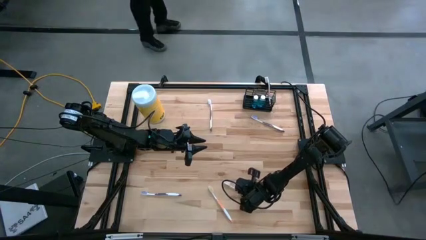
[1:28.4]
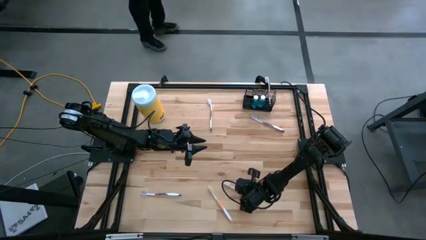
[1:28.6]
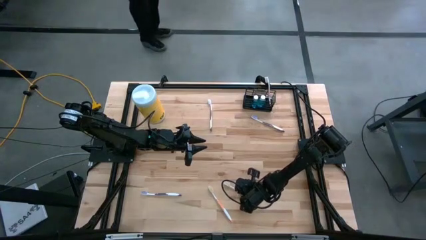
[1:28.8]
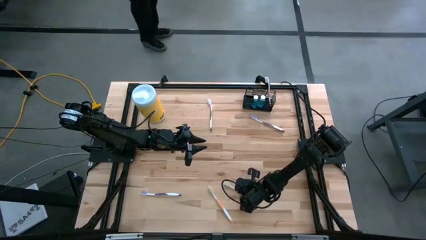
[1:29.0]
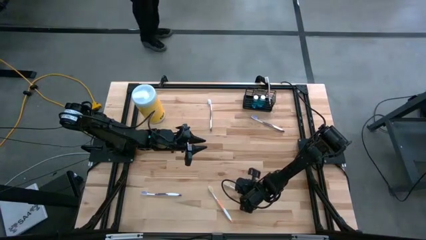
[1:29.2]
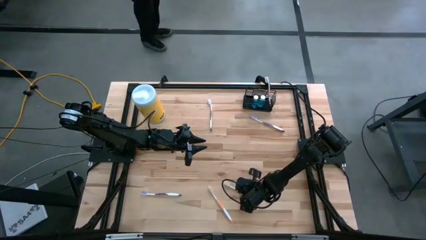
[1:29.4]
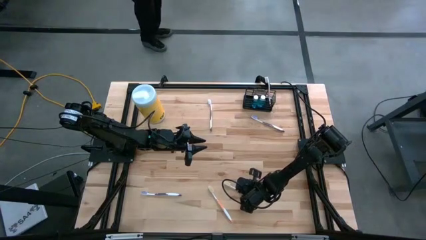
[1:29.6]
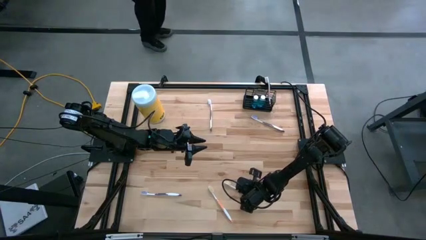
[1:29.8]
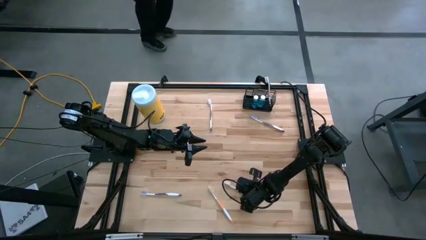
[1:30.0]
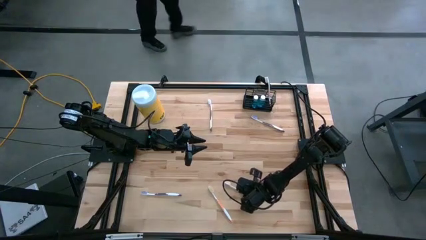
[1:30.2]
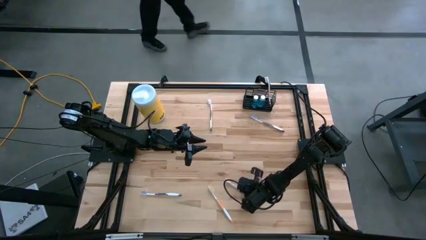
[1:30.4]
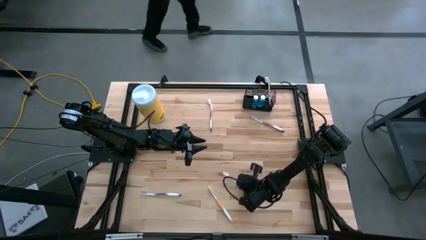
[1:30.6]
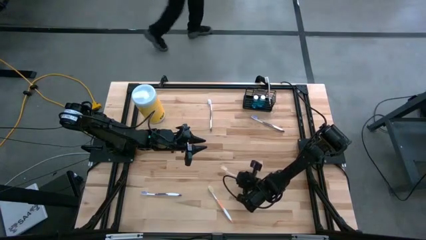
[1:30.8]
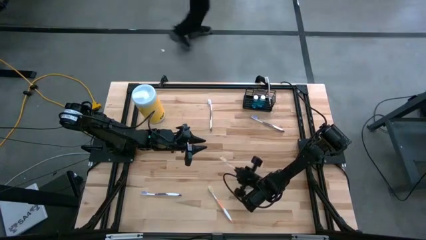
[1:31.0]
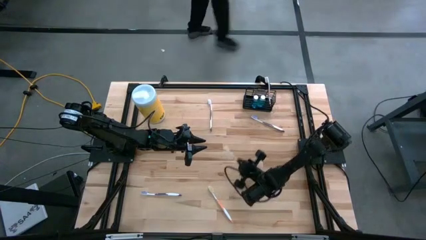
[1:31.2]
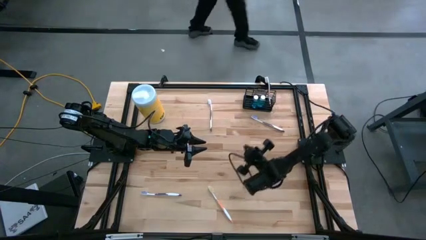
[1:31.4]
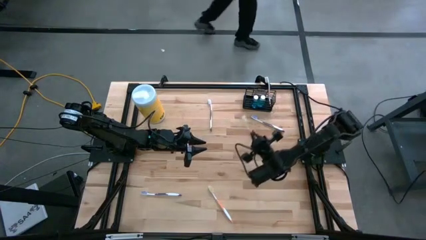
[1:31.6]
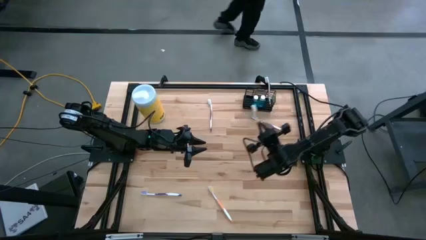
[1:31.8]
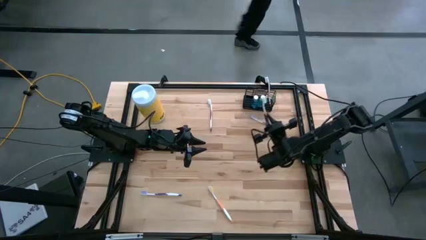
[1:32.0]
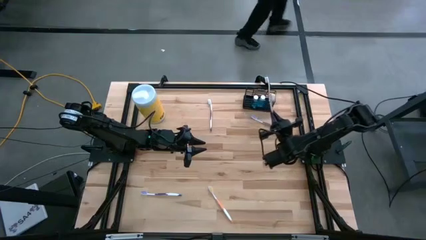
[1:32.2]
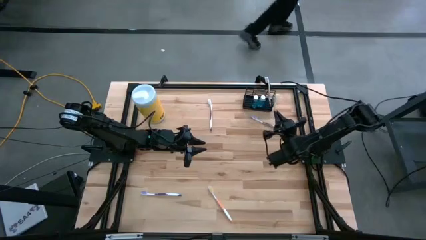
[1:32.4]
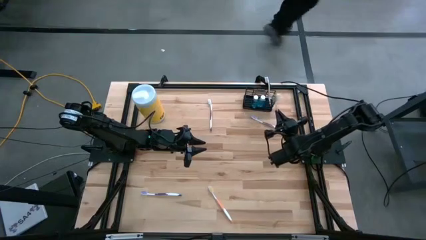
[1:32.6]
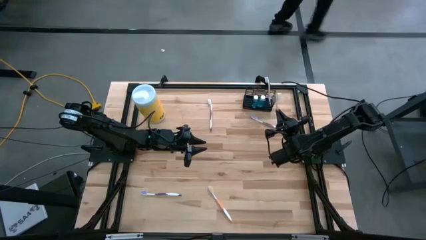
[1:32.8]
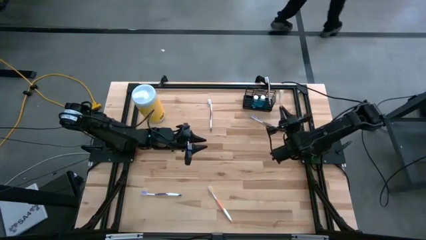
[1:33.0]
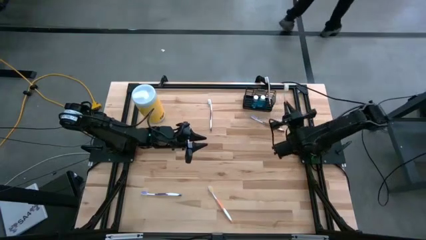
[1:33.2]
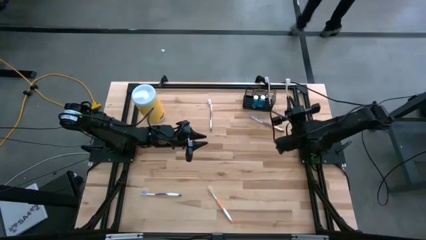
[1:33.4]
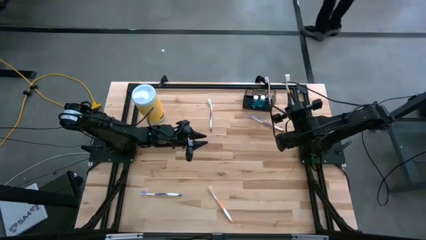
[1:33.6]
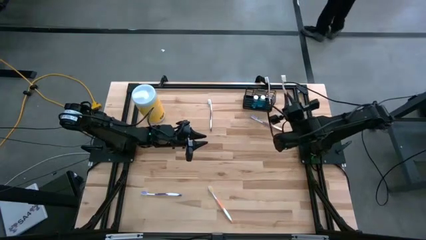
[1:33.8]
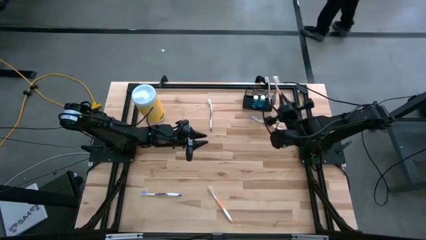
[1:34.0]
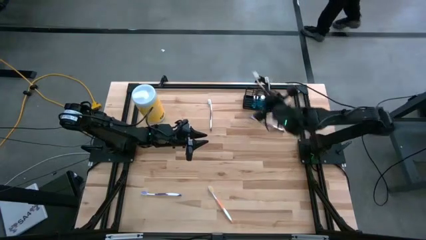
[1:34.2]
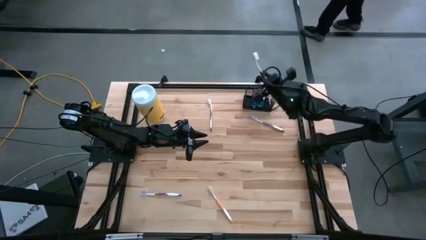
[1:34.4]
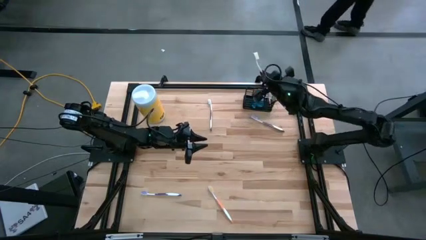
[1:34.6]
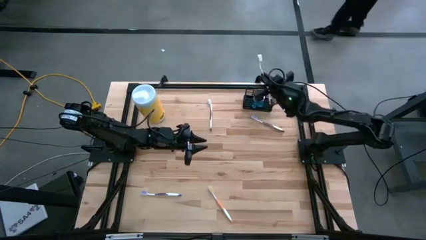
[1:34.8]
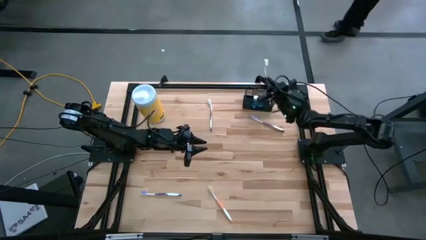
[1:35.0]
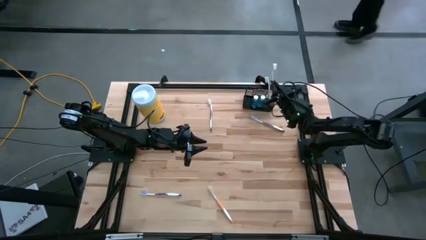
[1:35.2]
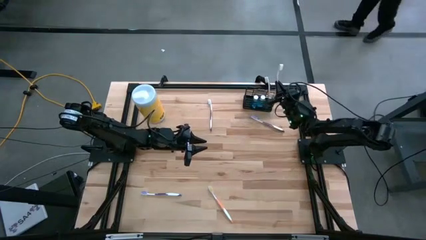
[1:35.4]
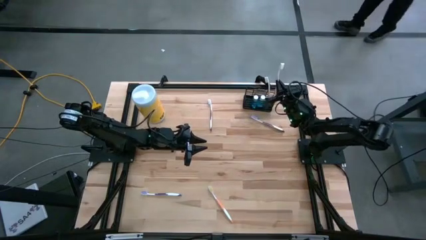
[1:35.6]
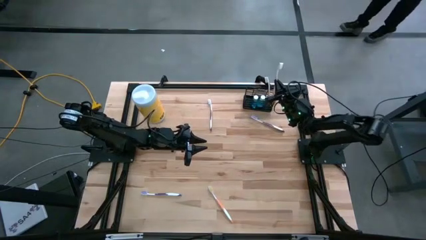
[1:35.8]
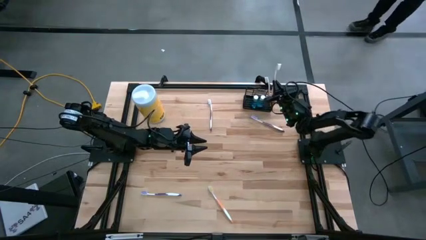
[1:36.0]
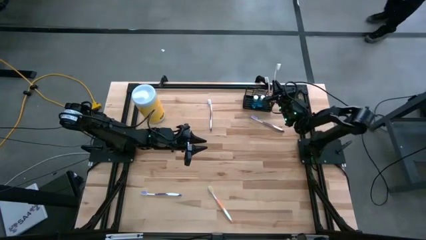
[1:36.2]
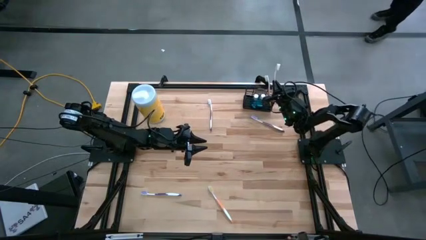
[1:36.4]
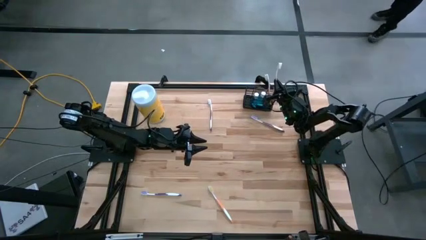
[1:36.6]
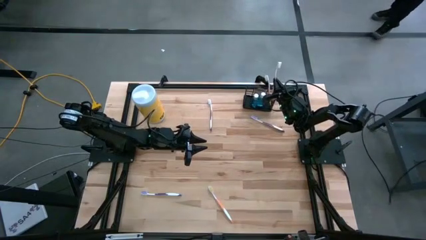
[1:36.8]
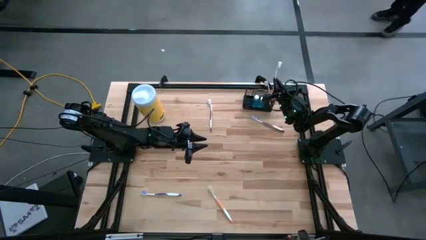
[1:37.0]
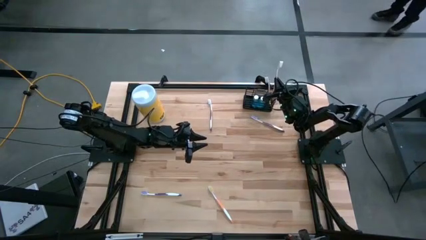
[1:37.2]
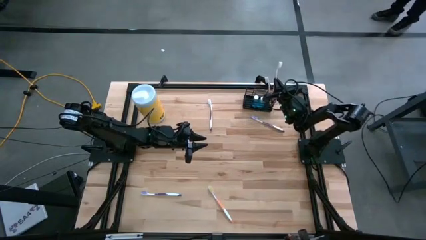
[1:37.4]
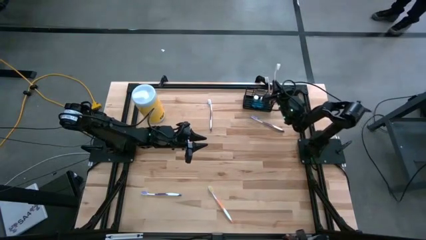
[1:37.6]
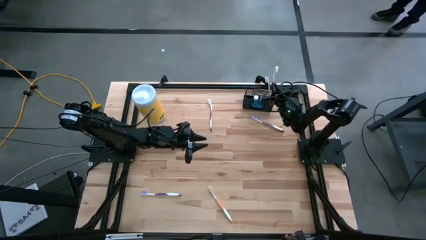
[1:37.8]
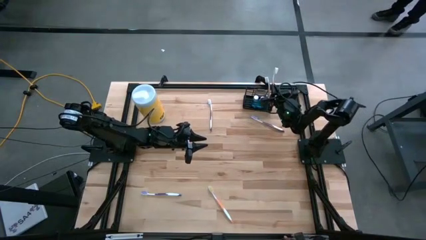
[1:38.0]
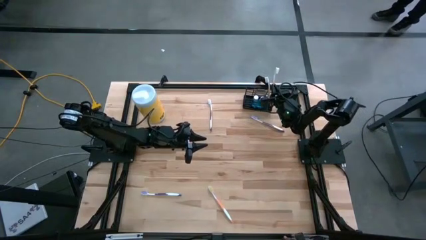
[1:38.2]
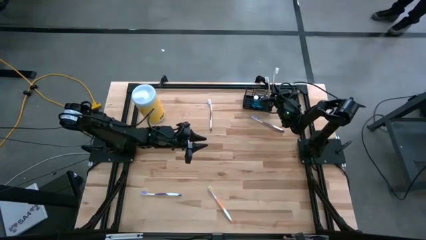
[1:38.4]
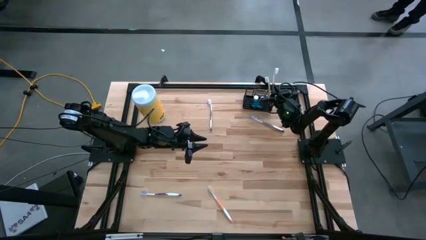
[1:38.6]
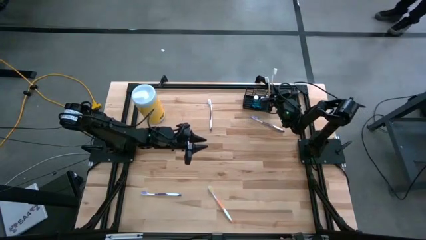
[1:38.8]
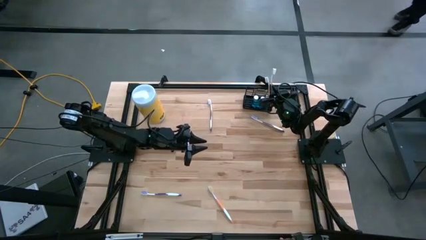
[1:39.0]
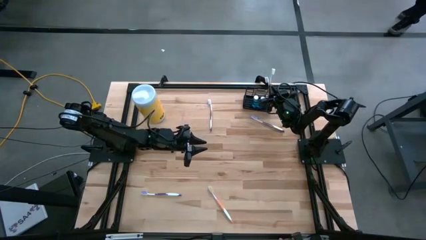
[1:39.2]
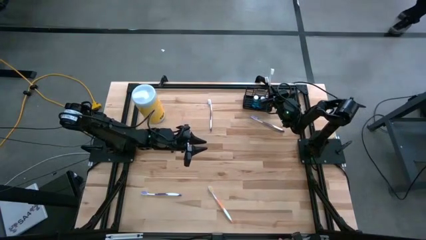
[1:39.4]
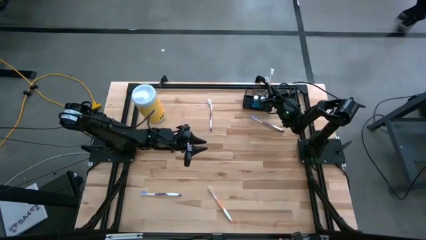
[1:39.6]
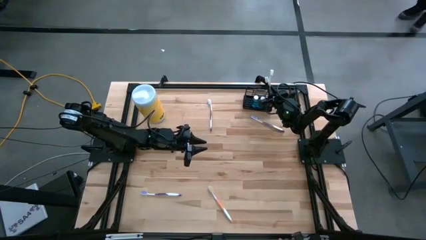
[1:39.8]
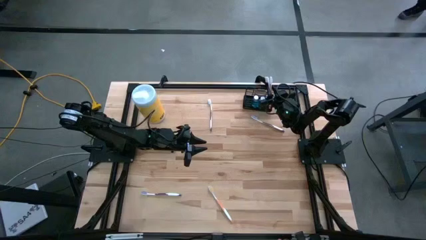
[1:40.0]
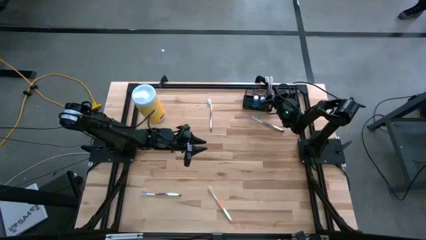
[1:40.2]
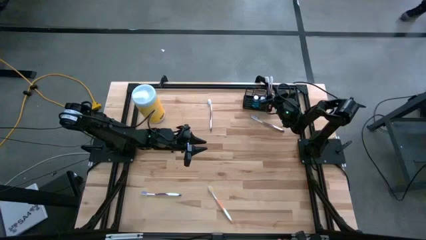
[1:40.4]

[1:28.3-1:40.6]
Task: Pick & Place toothbrushing station
Put the right orange toothbrush into the black wire organizer

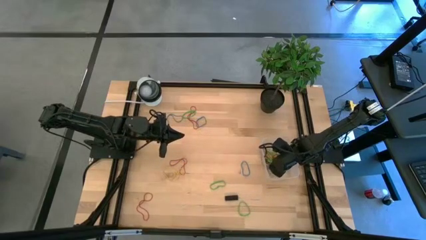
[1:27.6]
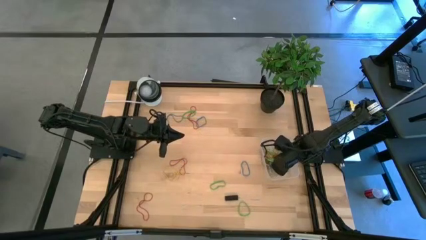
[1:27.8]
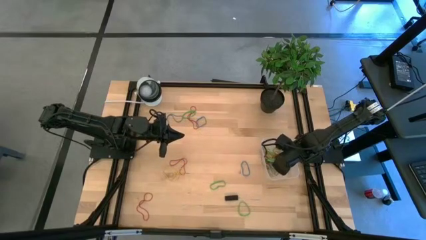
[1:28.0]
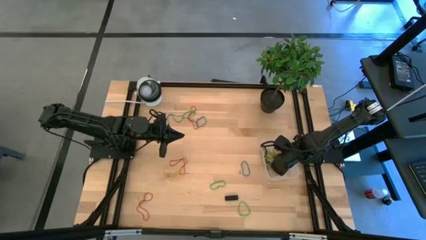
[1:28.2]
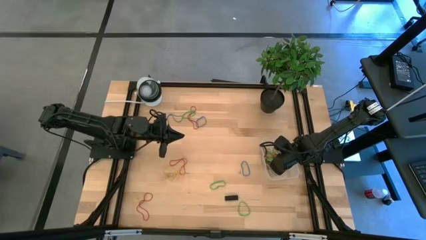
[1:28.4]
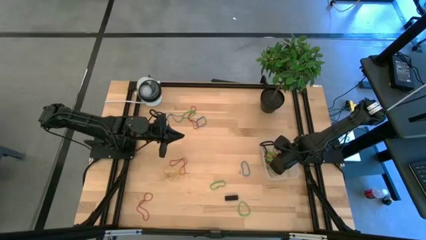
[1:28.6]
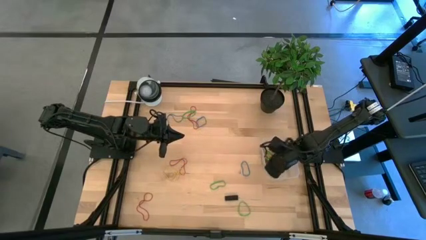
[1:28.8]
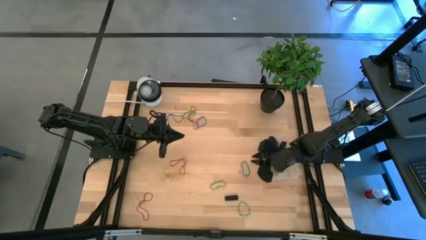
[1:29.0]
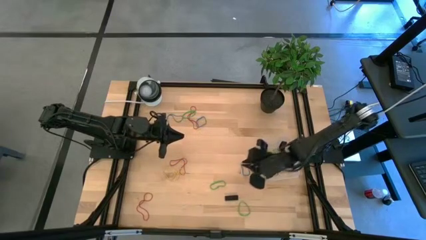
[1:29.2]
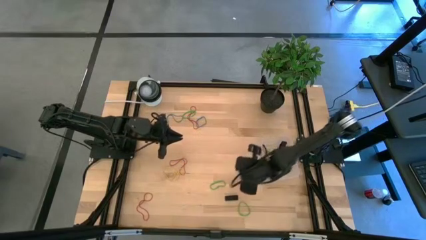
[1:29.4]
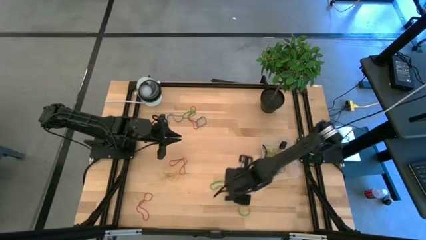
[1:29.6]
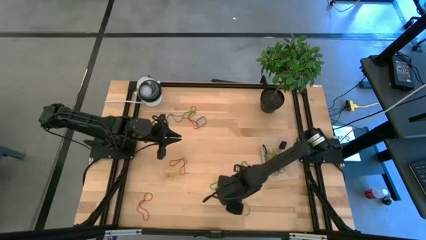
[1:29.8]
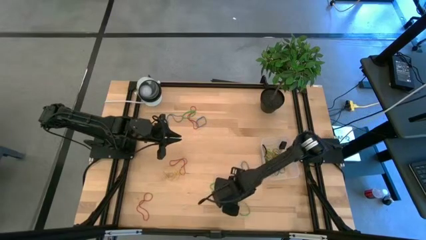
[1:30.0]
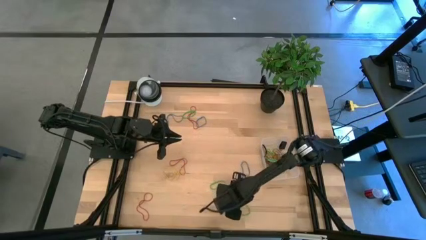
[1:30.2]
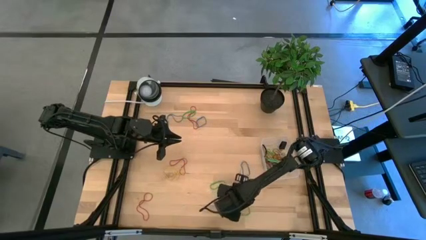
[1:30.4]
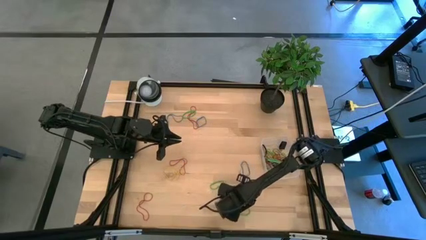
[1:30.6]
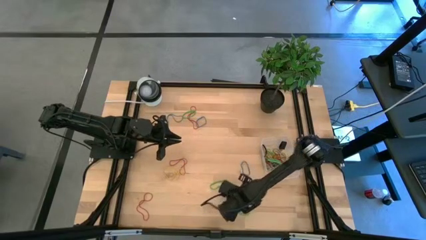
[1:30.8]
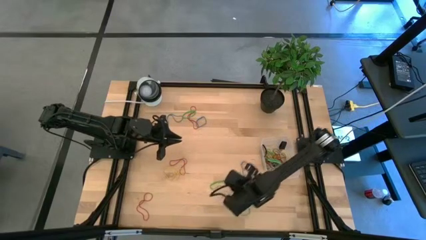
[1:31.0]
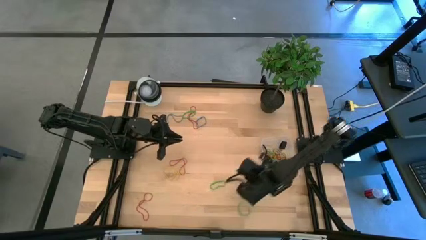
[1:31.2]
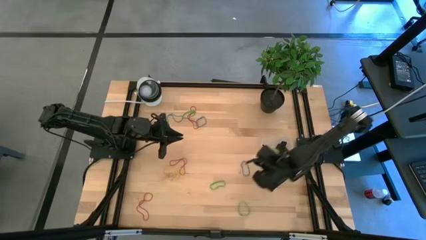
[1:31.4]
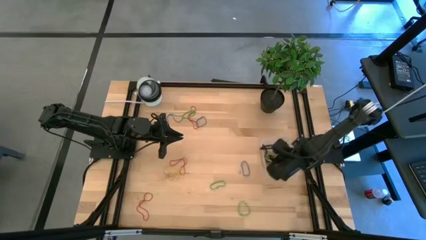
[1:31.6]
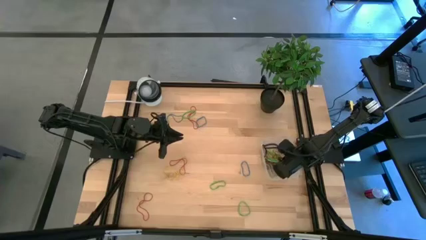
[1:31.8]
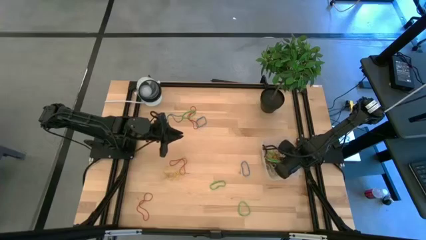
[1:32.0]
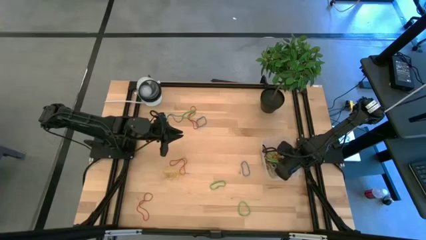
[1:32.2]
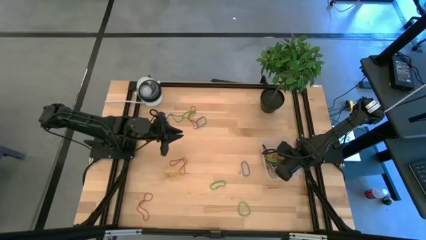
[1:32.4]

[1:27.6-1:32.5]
Task: Pick and place rubber bands into bin
Put the black rubber band into the transparent bin

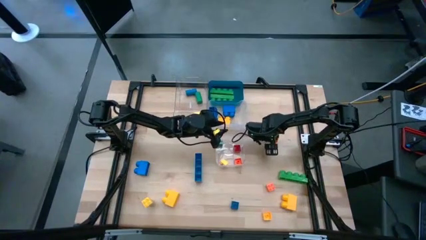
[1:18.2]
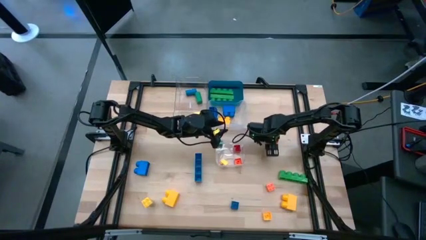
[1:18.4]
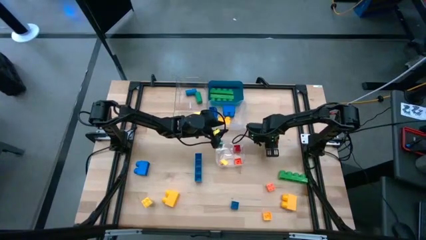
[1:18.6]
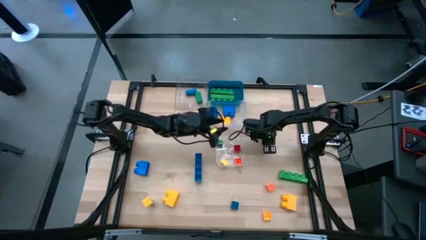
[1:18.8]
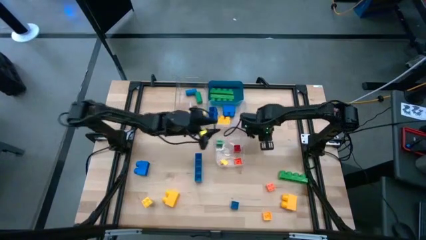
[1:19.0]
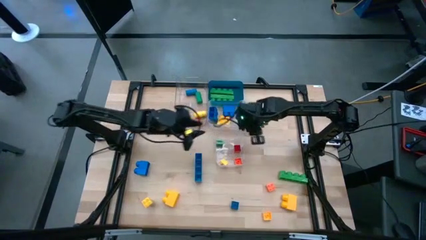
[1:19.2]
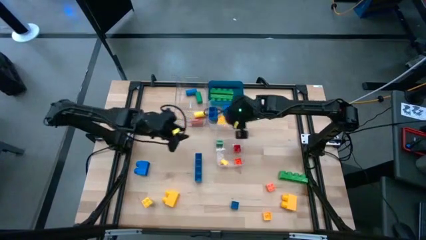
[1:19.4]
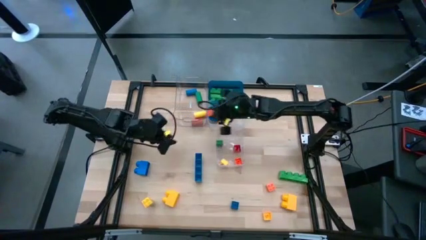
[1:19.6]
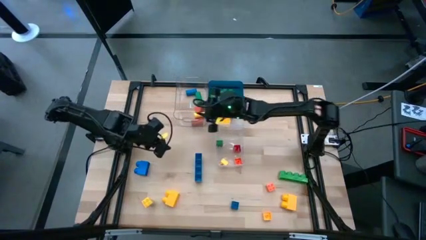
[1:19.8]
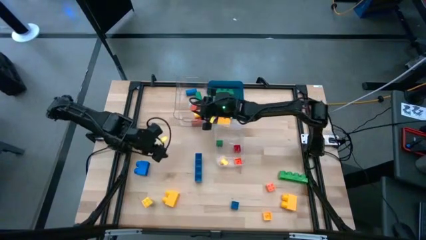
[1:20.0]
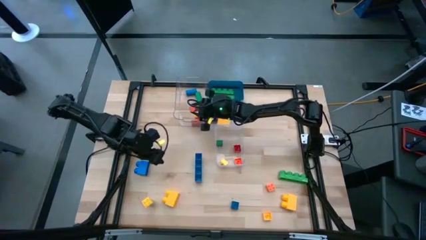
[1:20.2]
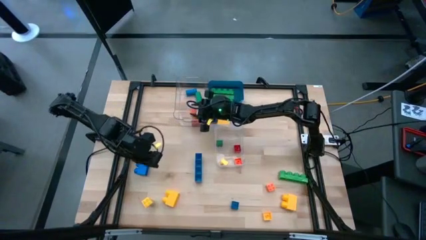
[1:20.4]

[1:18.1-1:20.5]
Task: Sort blocks by size
Put the orange cylindrical block into the top left transparent bin
